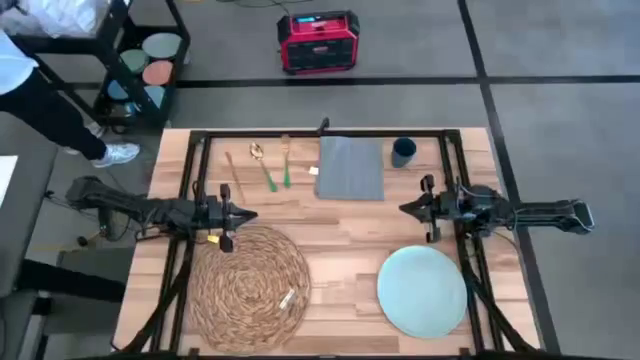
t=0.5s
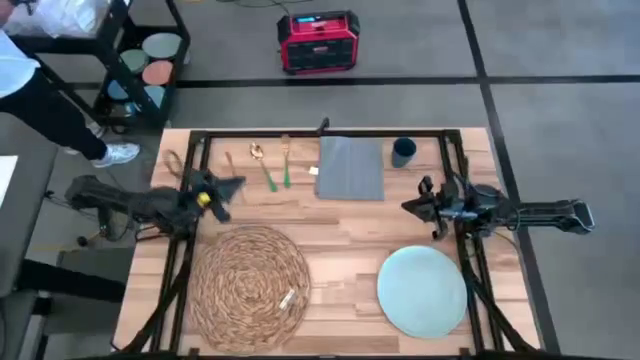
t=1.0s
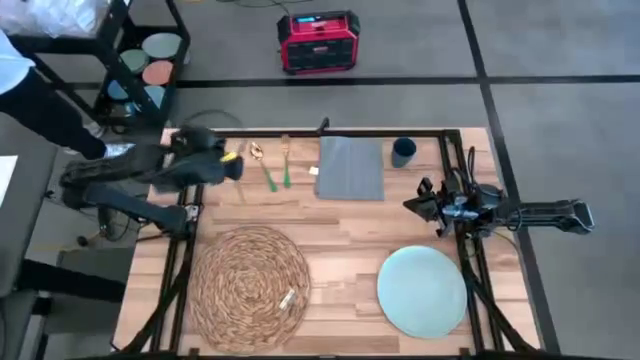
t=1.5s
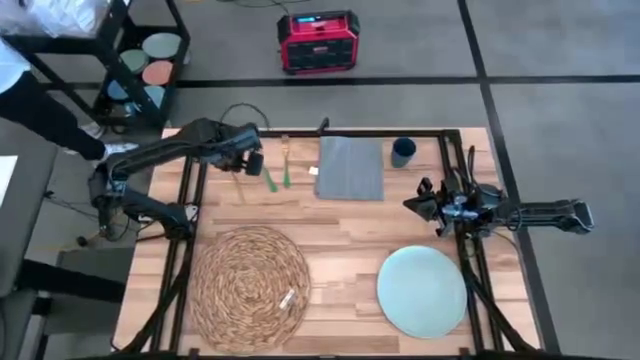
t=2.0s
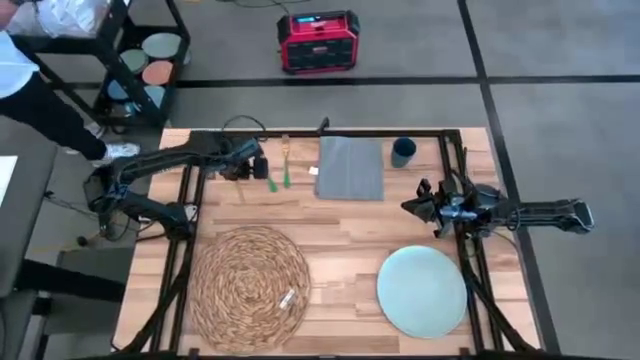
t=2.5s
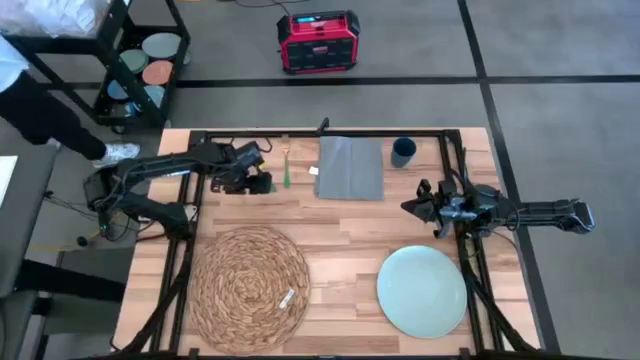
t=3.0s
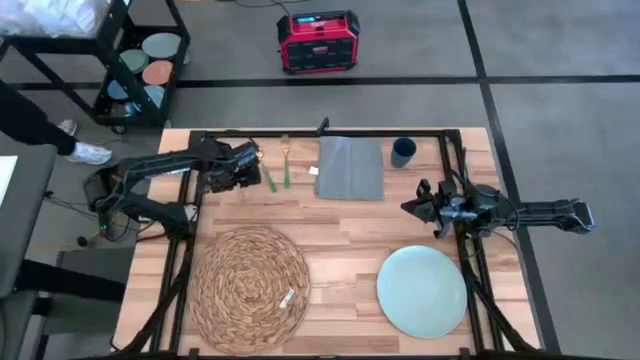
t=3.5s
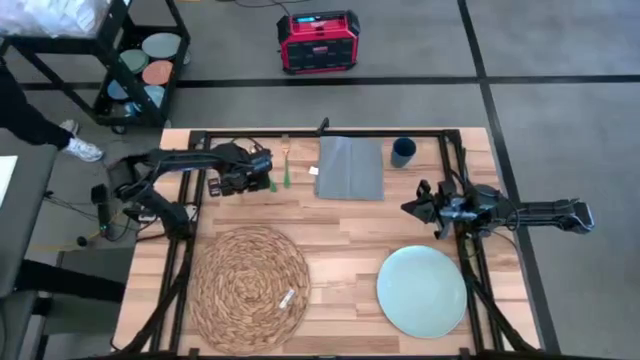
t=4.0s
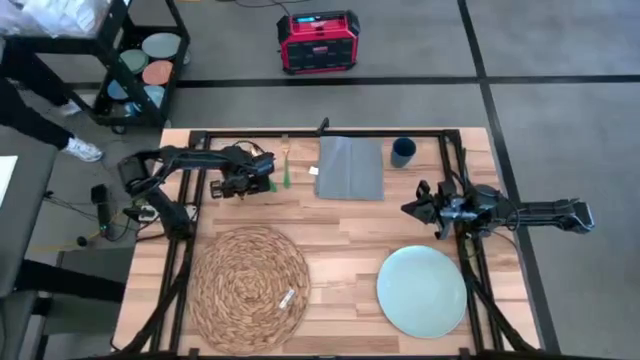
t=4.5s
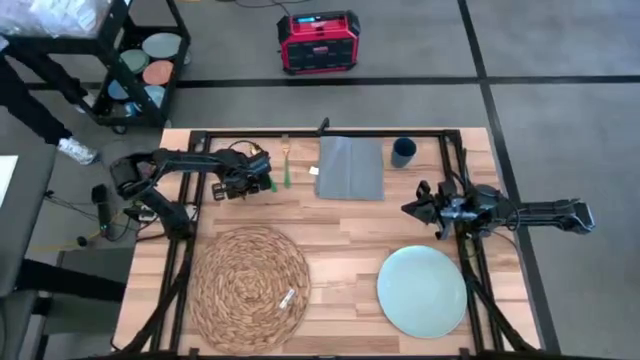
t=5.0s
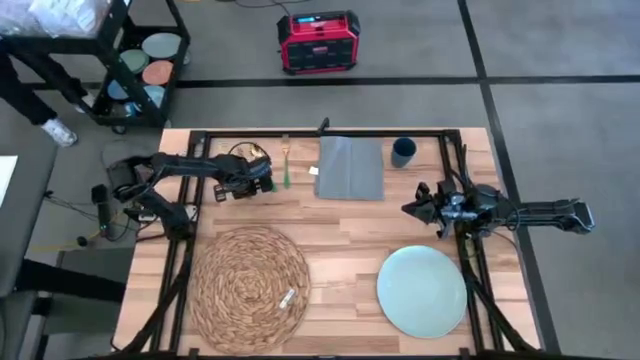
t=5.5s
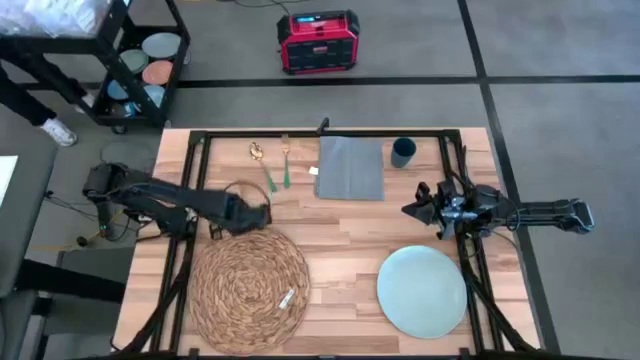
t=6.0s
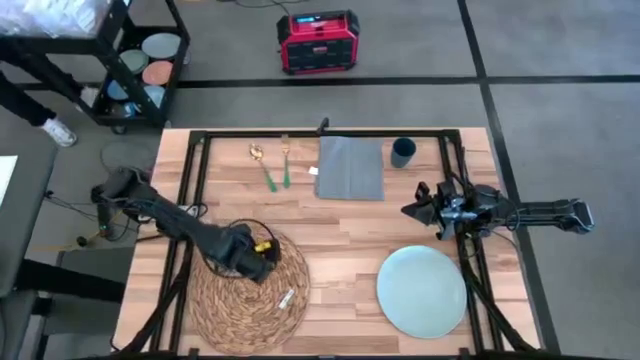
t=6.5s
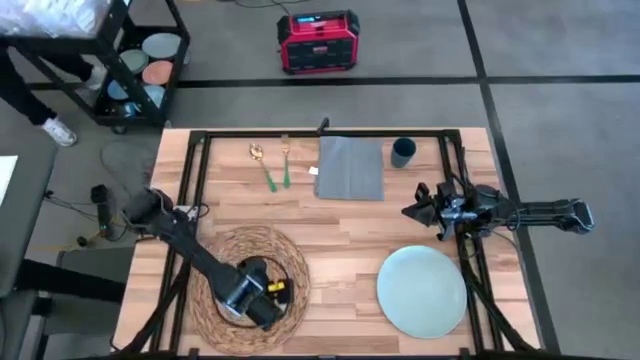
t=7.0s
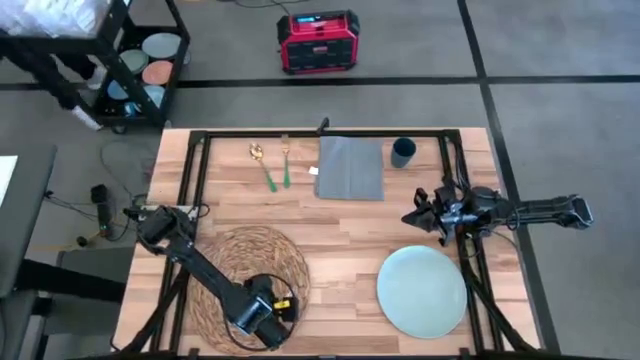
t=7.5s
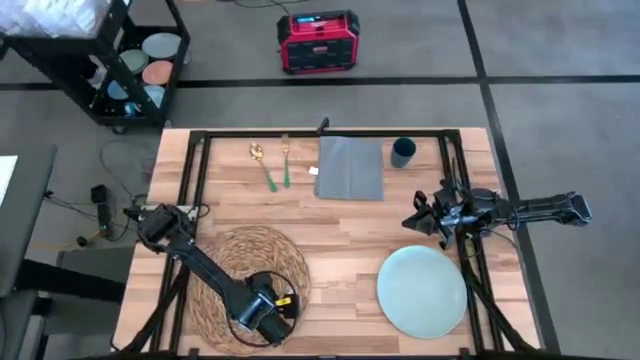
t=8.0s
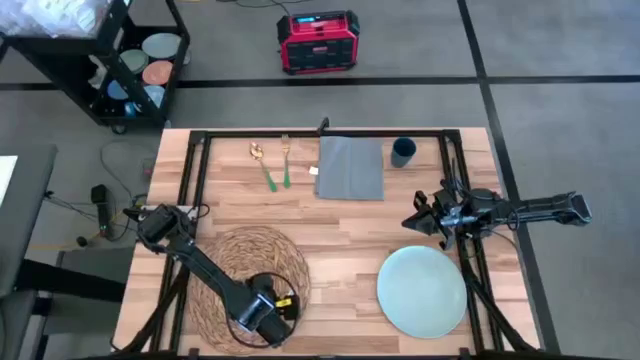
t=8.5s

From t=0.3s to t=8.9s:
Task: Set table place
Put the gold table knife to the left of the brown table mat

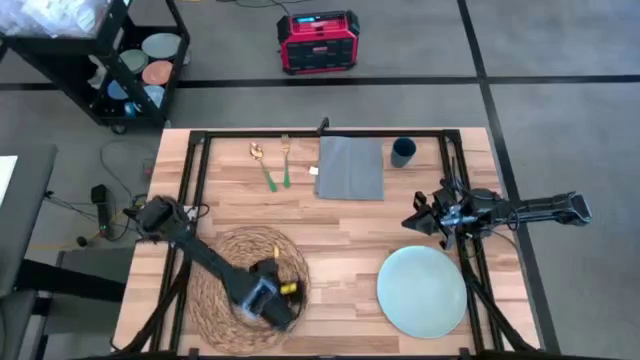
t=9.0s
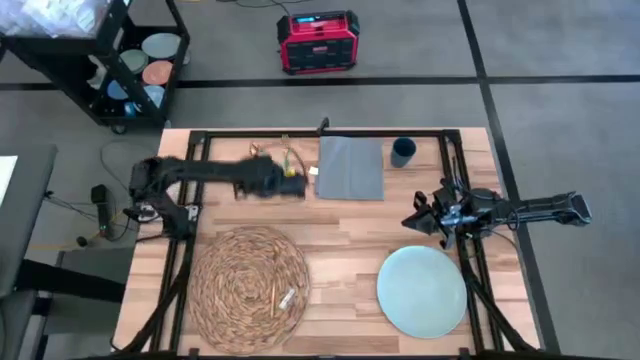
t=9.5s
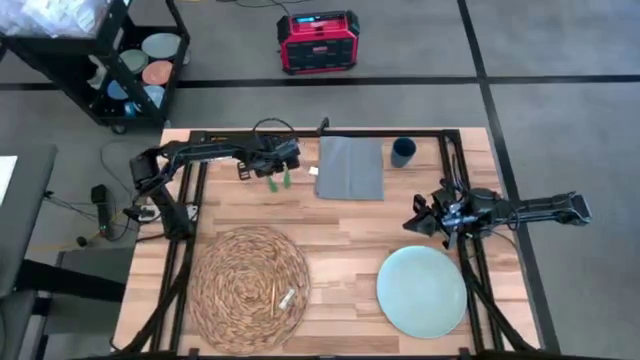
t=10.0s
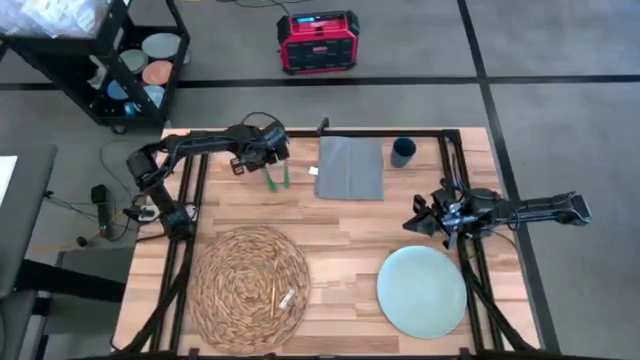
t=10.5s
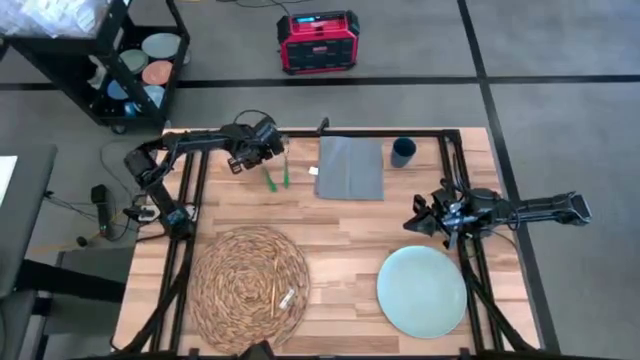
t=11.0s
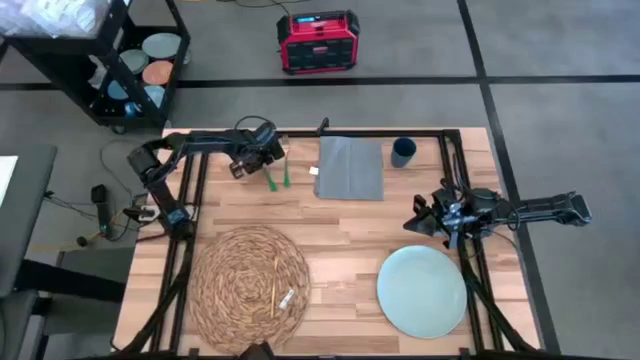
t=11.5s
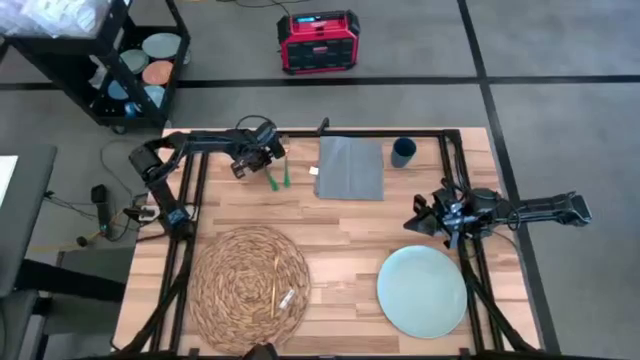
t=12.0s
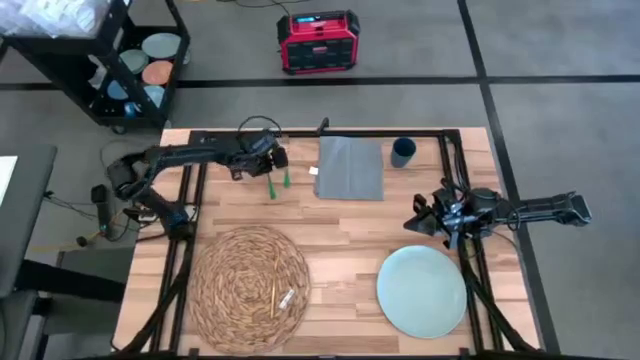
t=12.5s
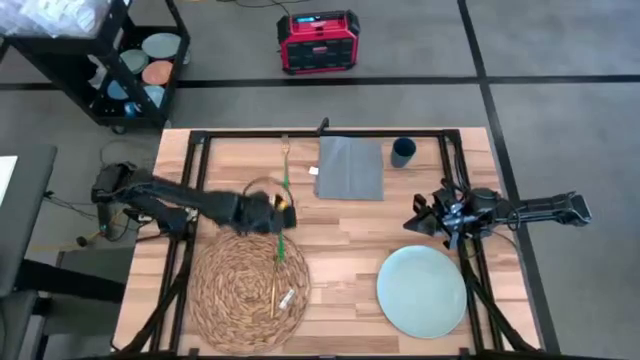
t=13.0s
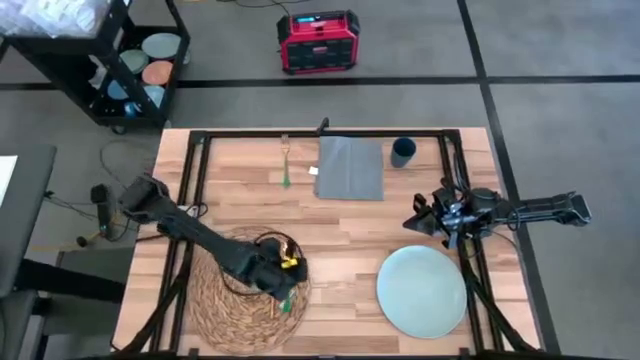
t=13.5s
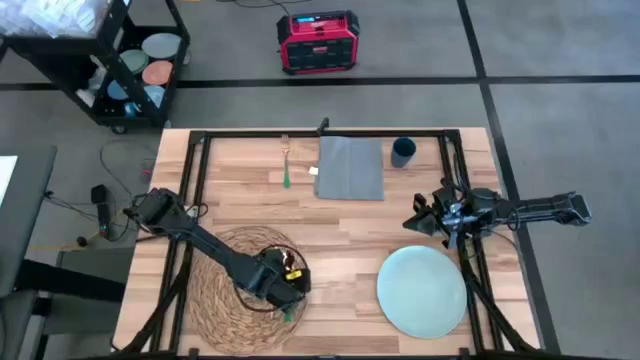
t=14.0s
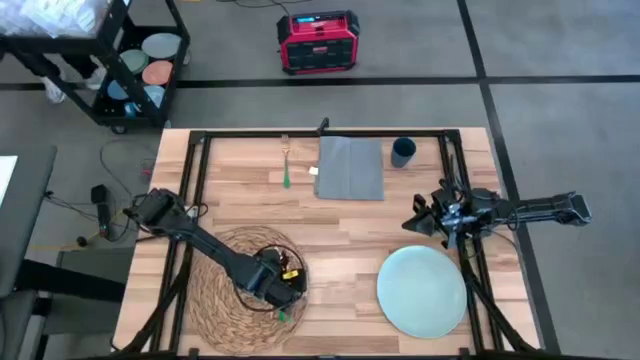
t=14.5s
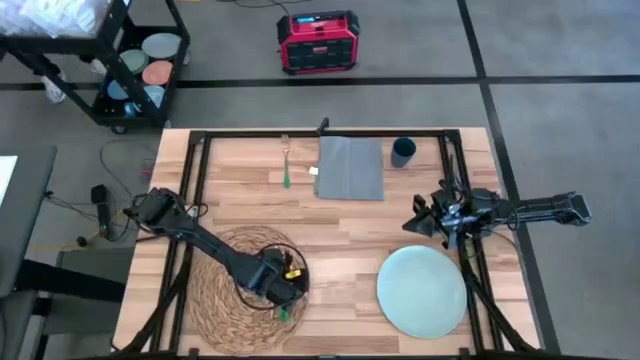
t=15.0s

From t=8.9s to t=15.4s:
Put the green spoon to the right of the gold table knife on the brown table mat

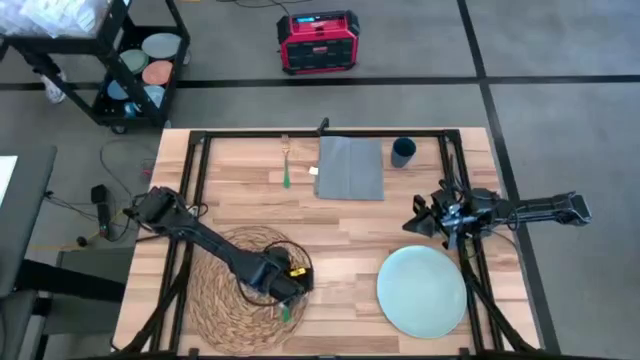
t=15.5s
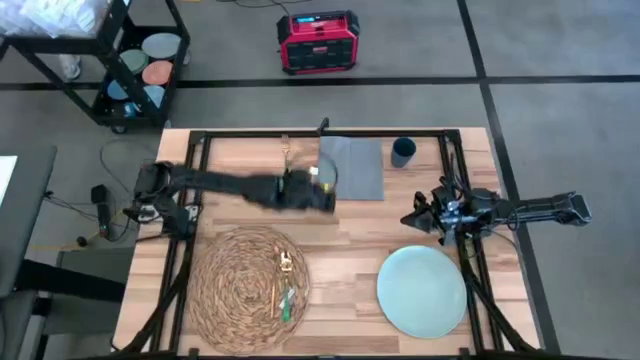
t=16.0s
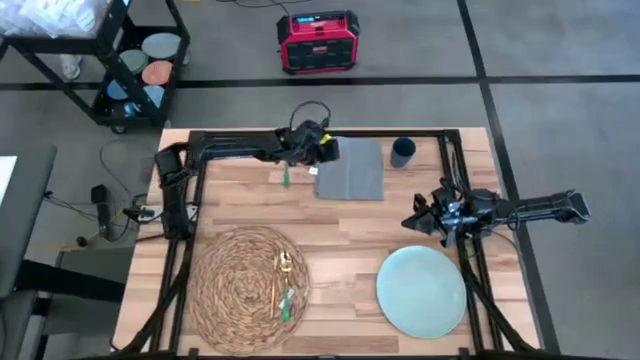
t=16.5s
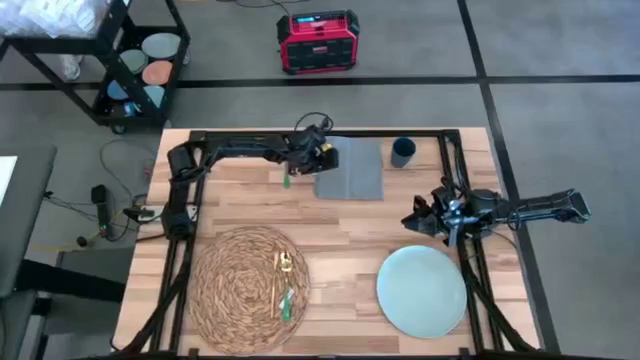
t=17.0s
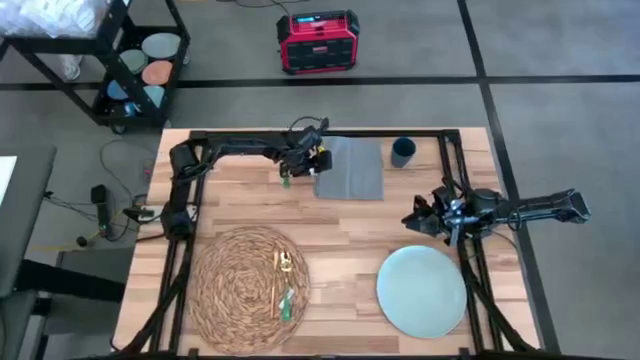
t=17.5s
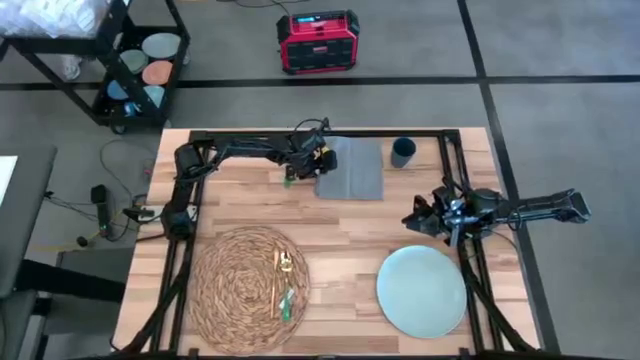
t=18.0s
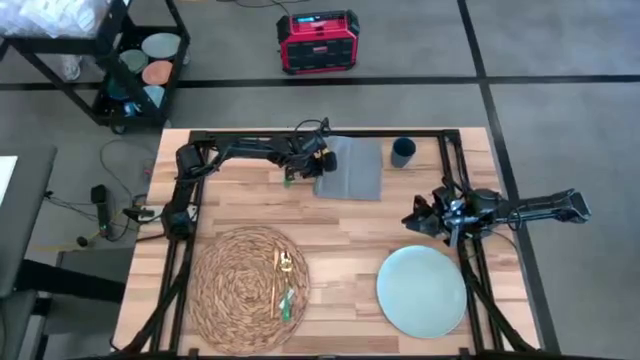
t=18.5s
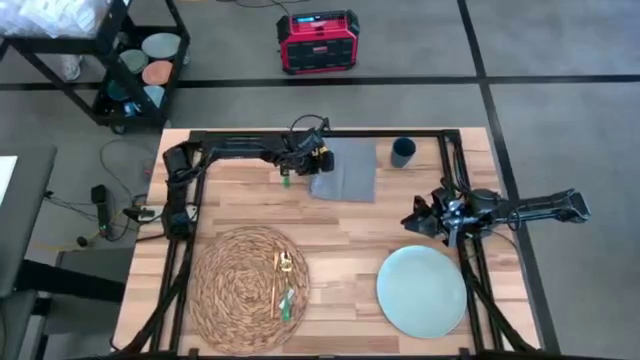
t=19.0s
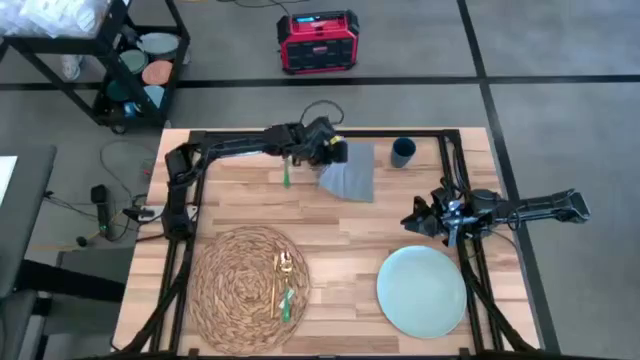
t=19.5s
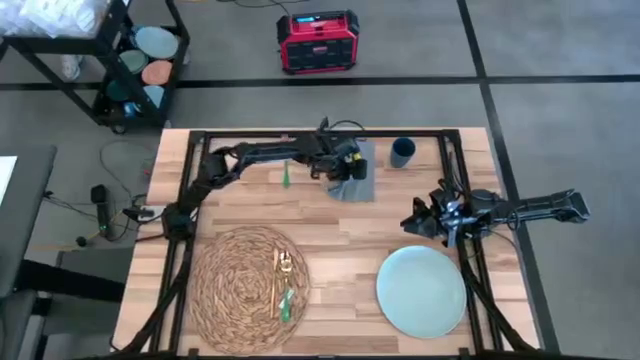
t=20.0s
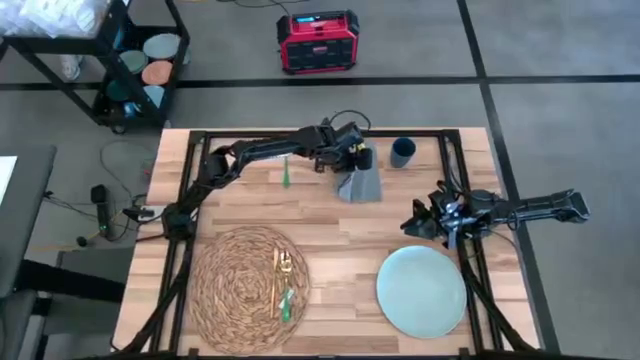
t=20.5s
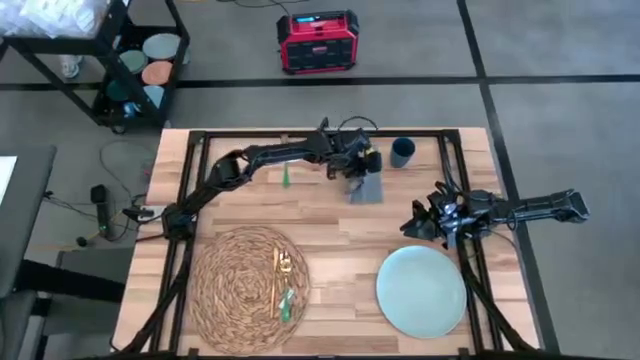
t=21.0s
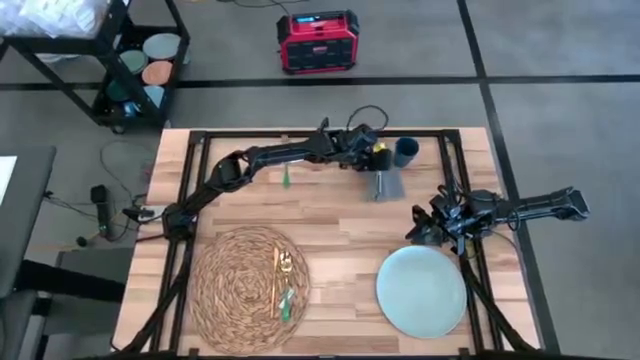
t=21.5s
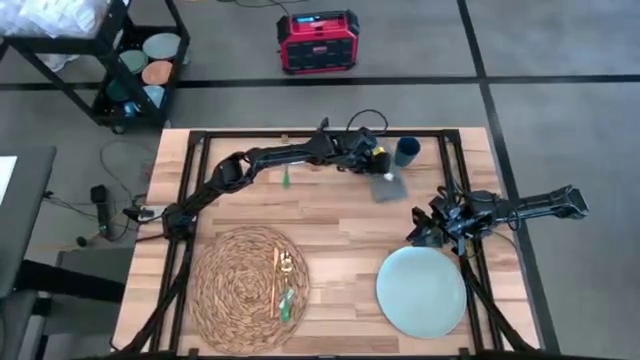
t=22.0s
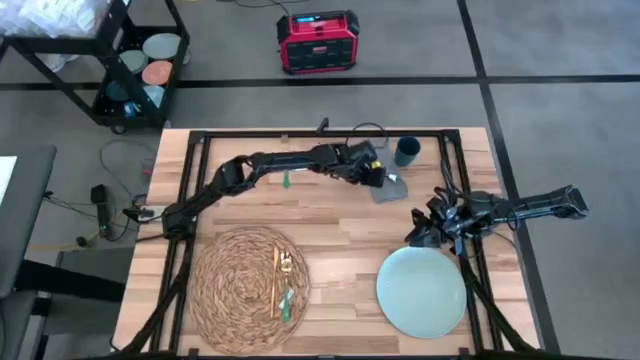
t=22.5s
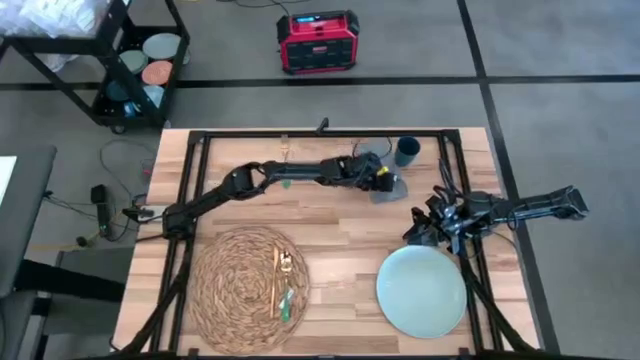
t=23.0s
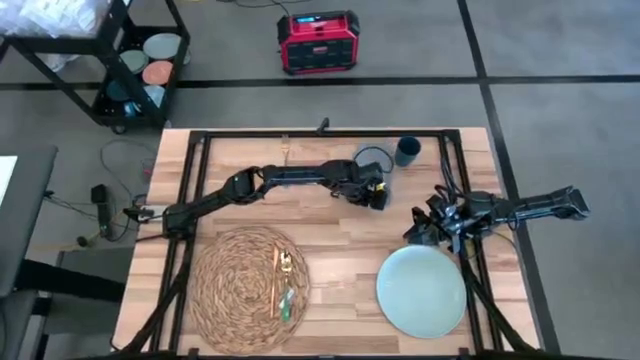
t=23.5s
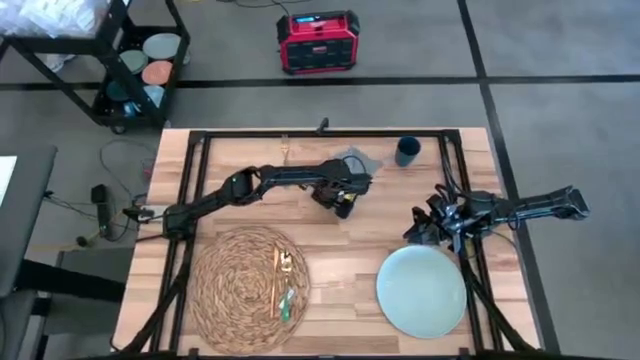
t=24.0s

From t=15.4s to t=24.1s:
Fold the gray table napkin
